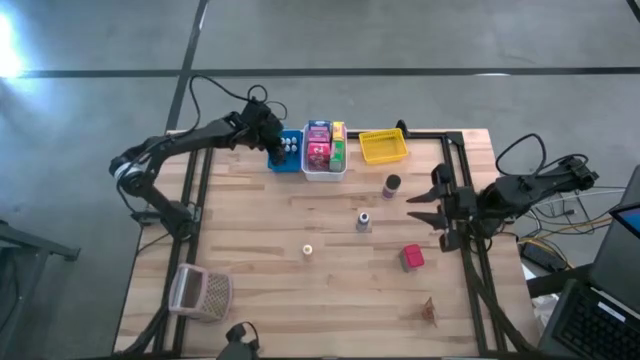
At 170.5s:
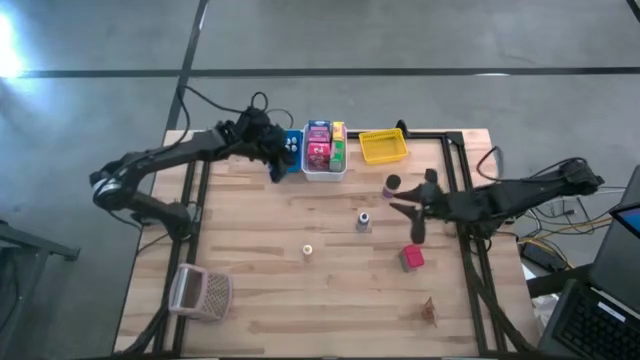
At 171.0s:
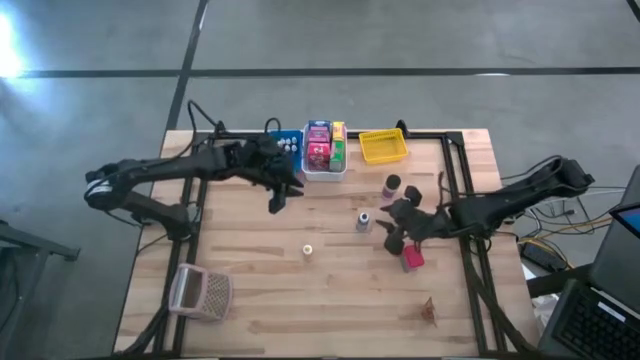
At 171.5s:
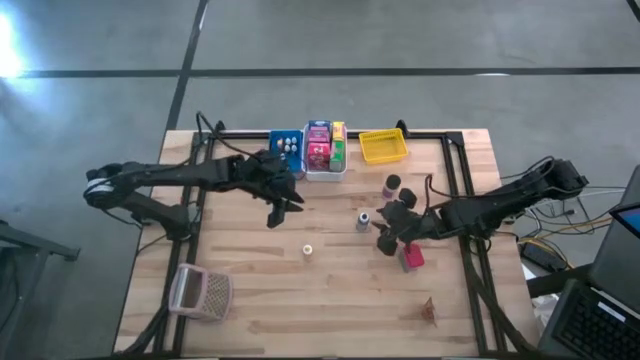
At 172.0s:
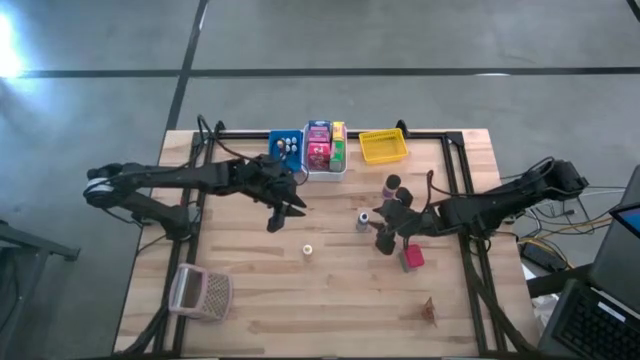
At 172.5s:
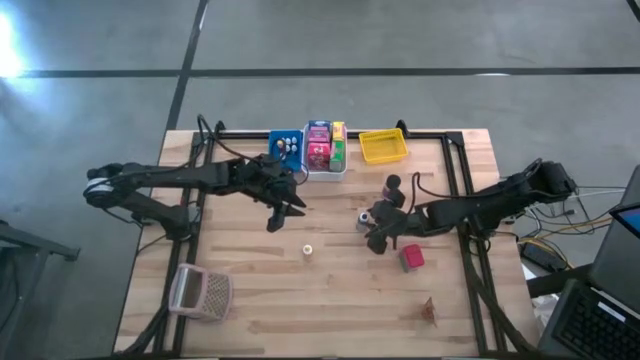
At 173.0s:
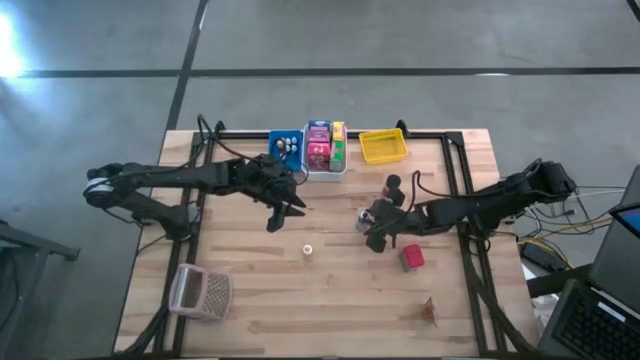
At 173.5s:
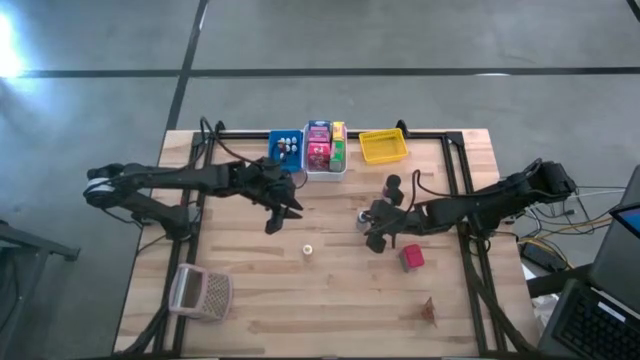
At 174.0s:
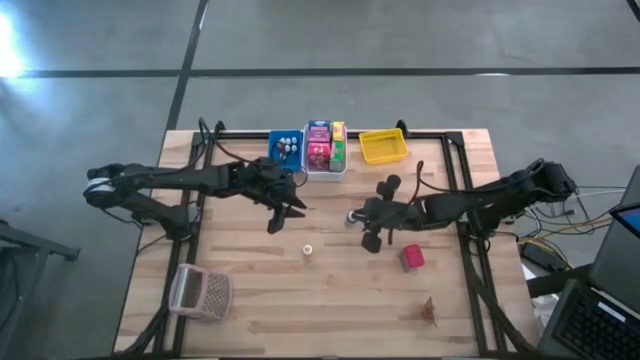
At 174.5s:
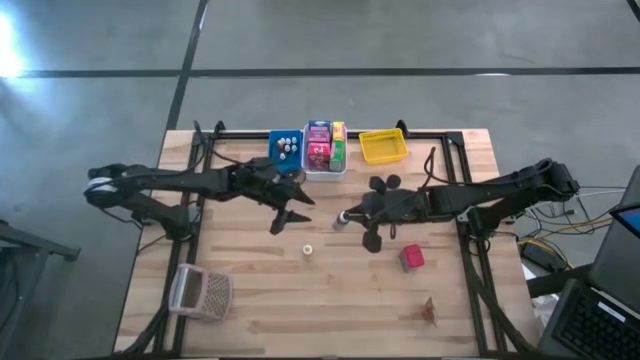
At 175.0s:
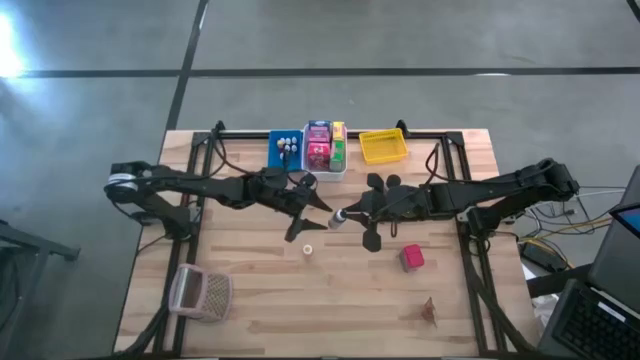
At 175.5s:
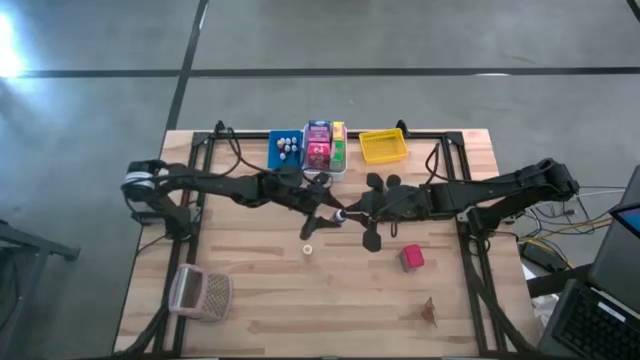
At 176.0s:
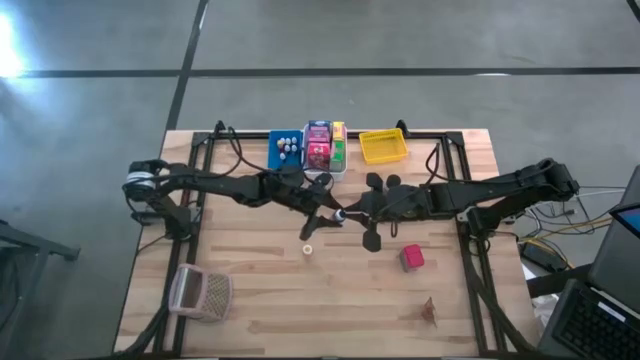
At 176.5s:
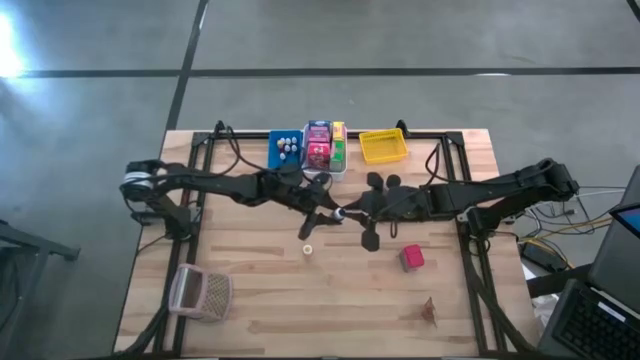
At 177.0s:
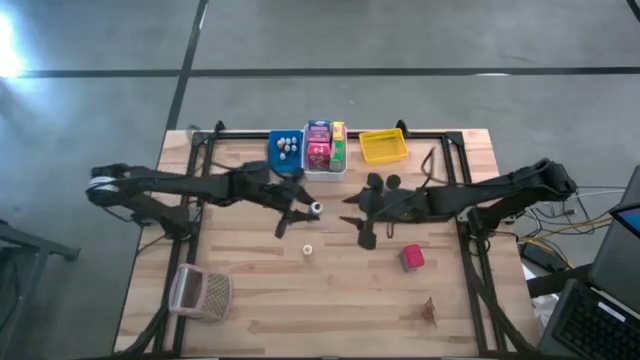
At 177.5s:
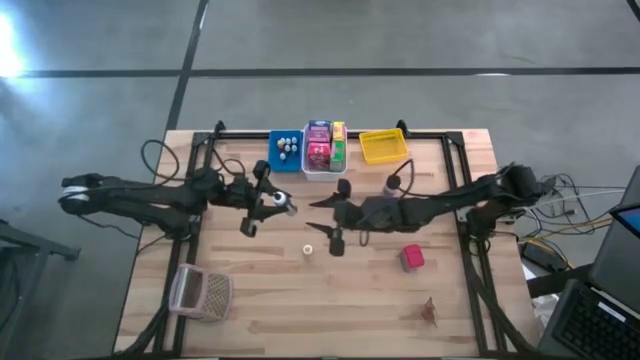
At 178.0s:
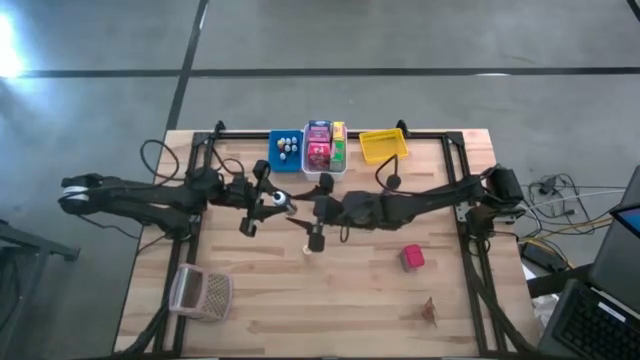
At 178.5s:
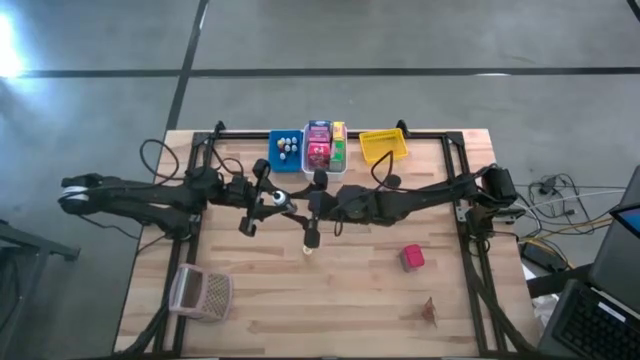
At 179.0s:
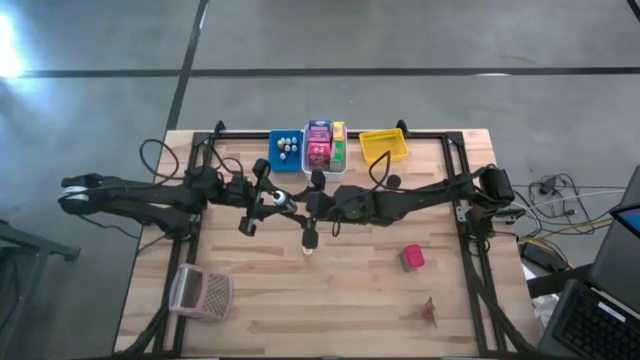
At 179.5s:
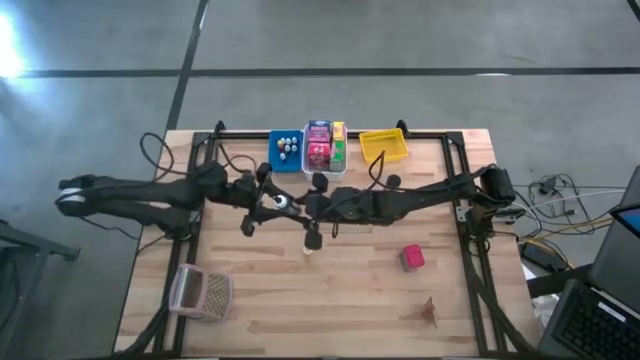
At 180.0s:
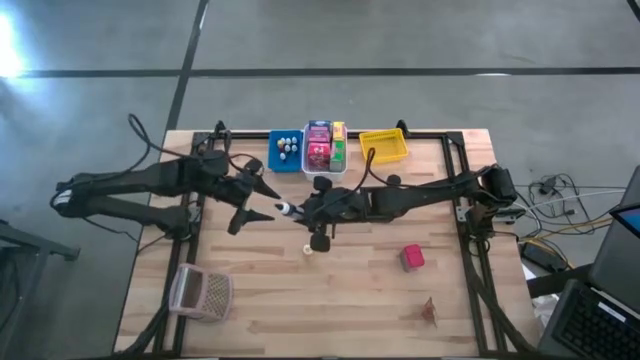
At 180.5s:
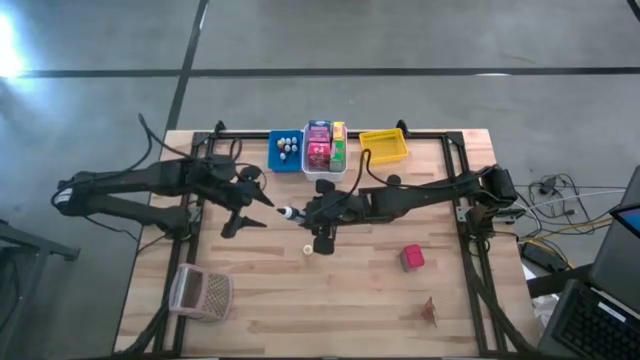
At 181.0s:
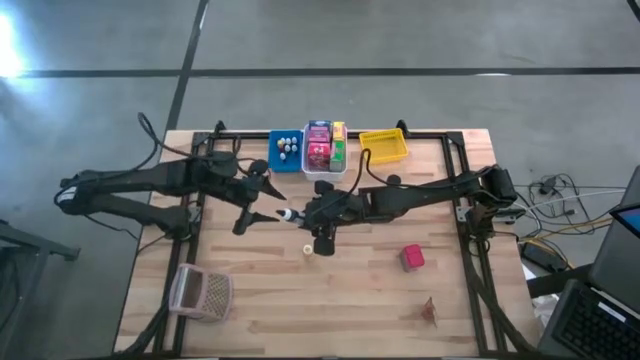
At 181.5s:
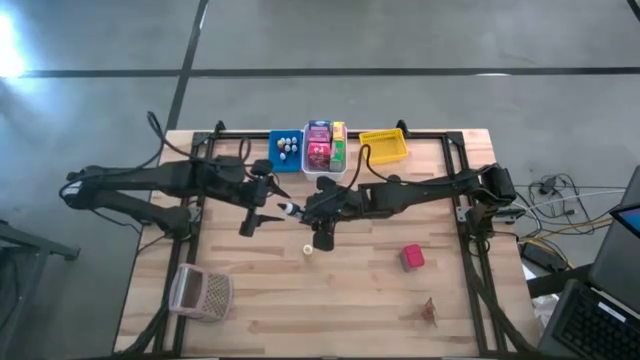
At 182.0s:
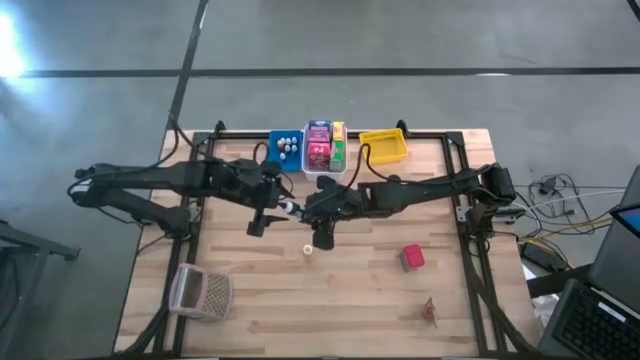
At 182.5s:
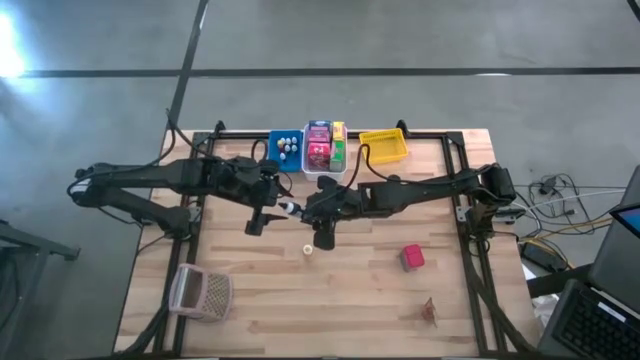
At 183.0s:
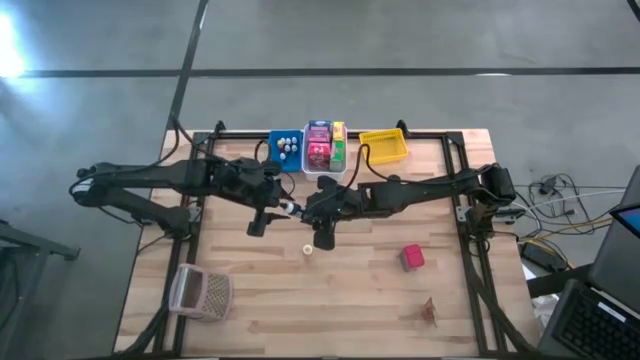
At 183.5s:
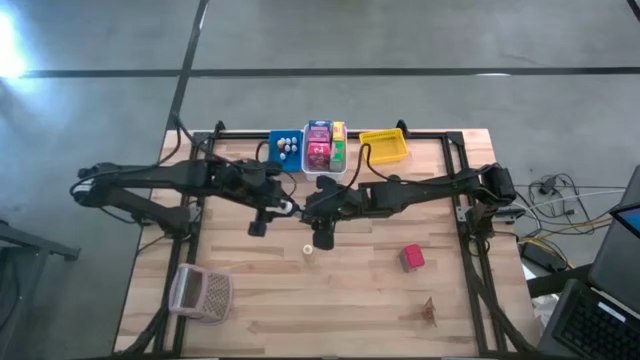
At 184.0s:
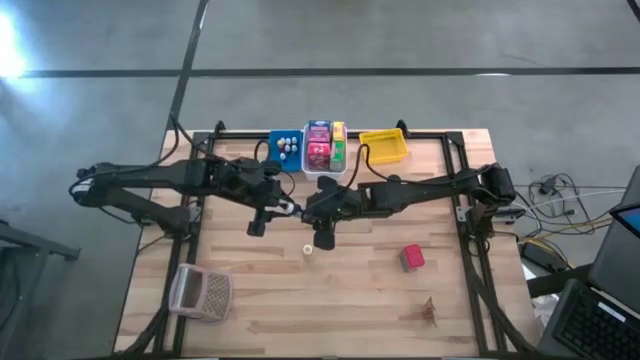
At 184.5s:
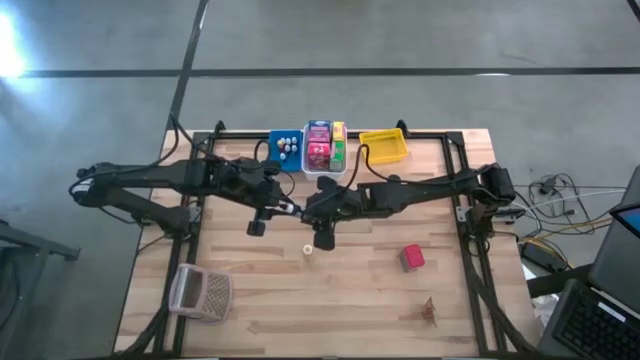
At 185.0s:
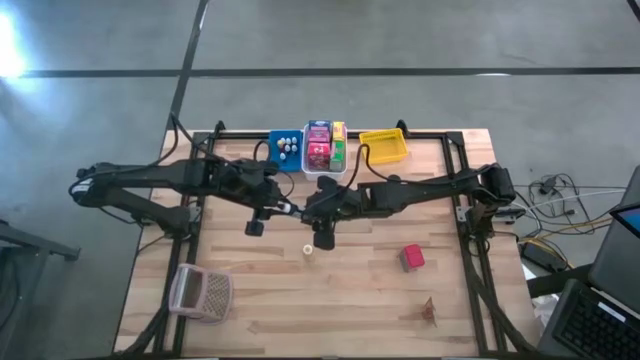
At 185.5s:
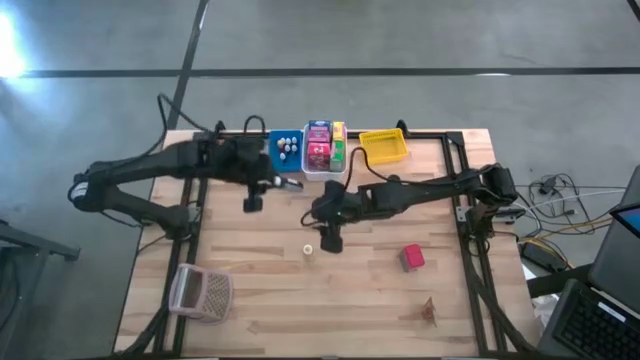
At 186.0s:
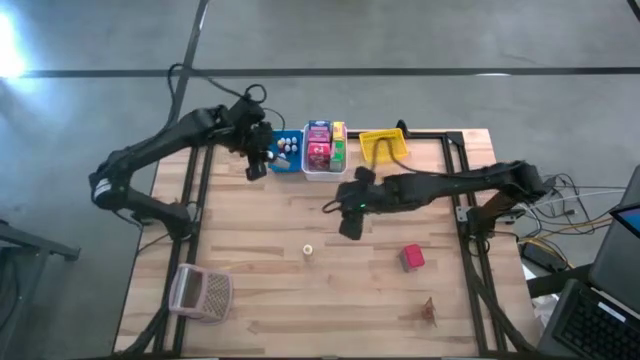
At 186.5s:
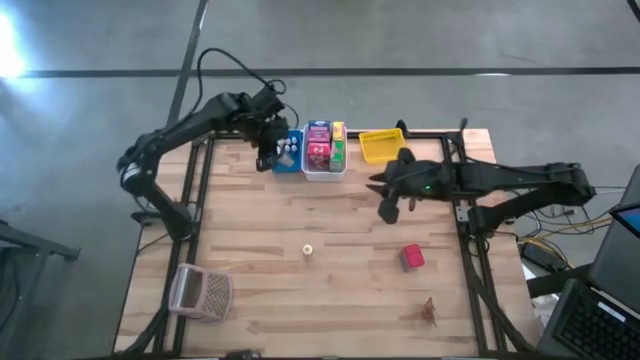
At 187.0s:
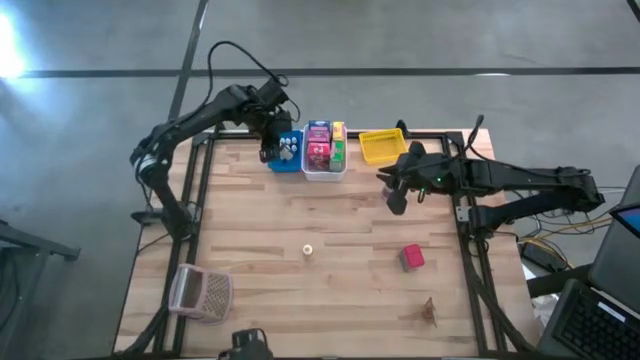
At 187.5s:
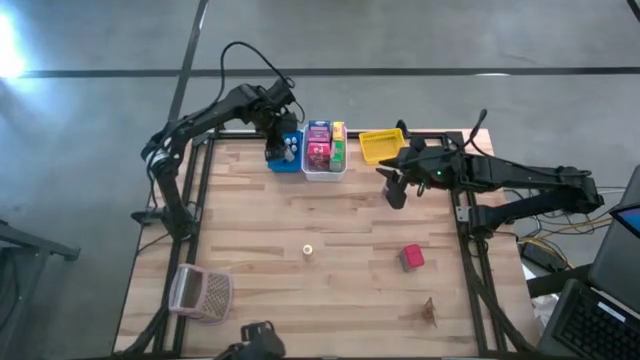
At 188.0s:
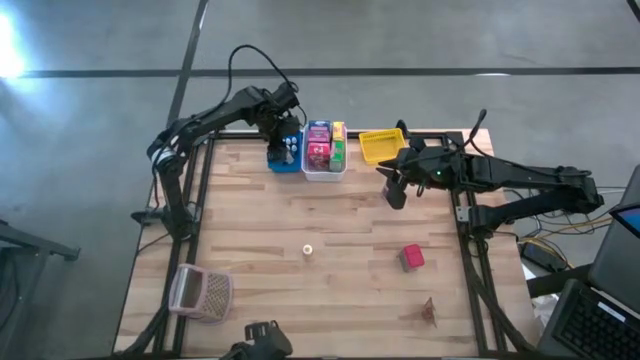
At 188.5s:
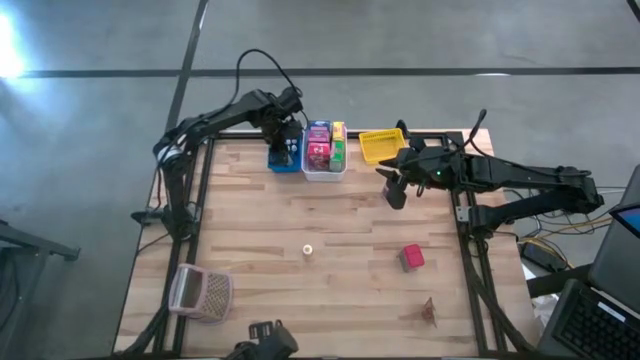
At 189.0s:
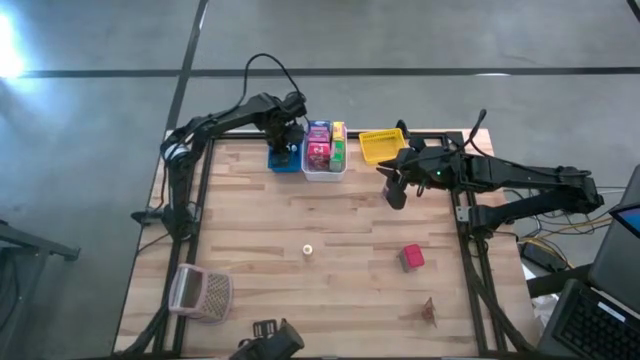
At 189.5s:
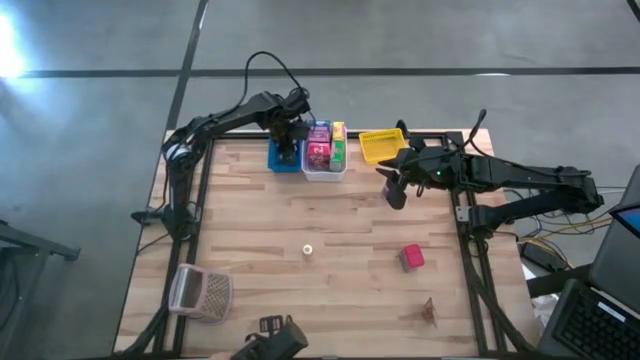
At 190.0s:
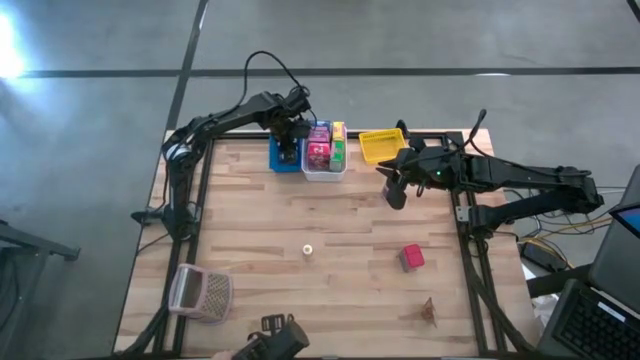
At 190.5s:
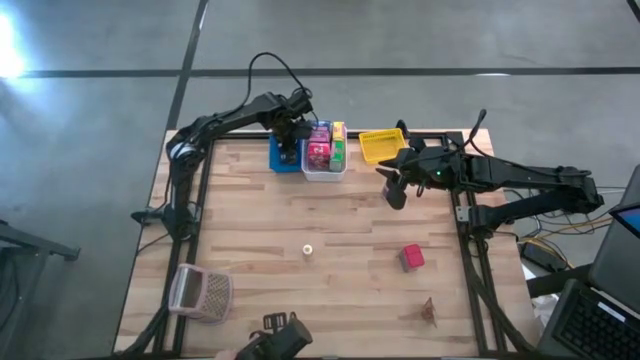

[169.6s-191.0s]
Task: Pick & Place Kitchen Items
Put the large black food coloring bottle into the blue bin

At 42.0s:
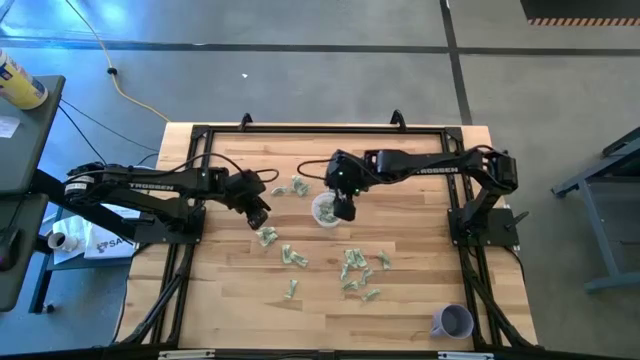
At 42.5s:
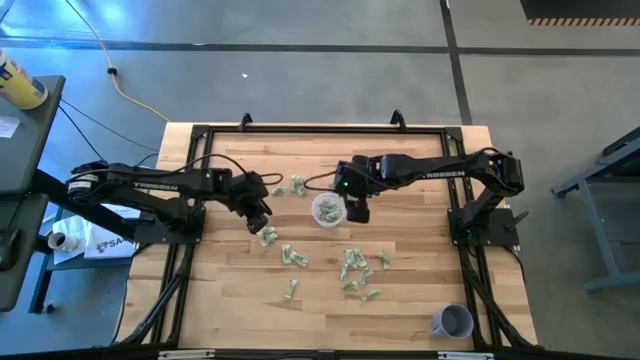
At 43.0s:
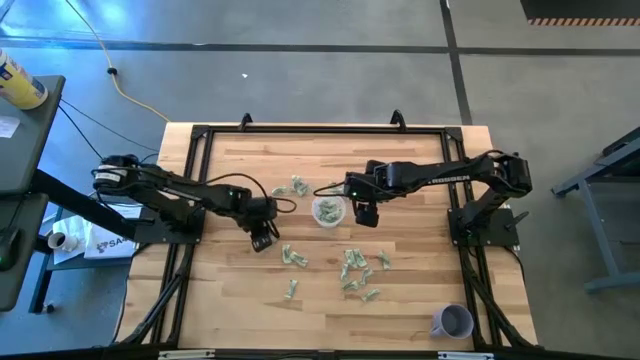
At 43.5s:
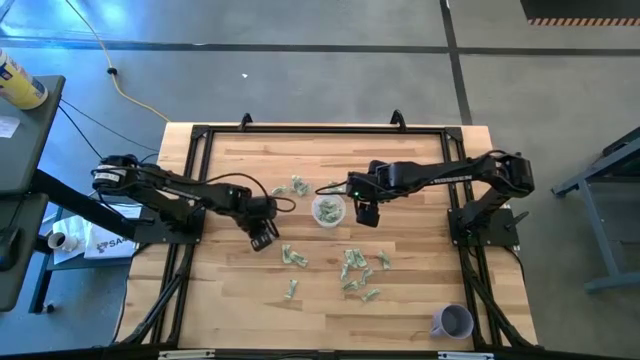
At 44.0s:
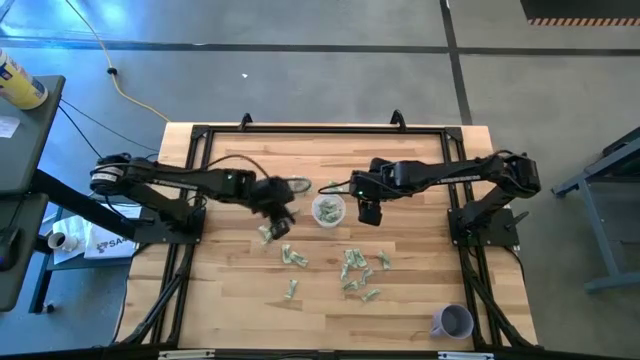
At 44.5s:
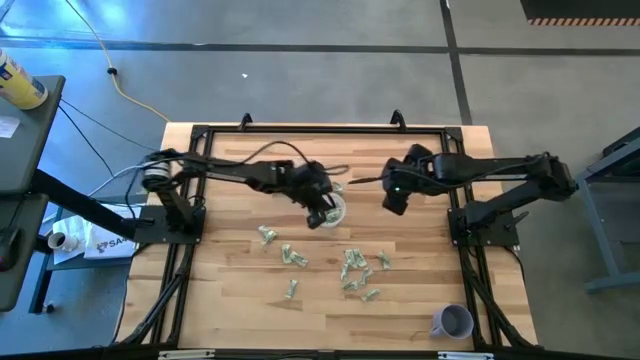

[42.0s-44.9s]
Task: Pick and place Stevia / Truvia into bins
Put the white stevia packet into the transparent container
